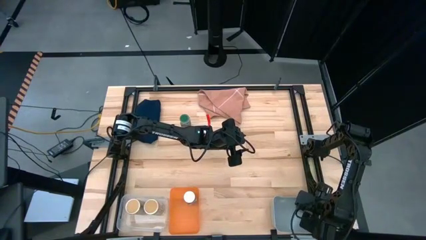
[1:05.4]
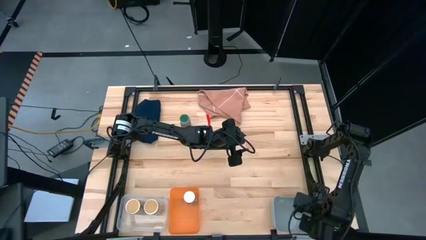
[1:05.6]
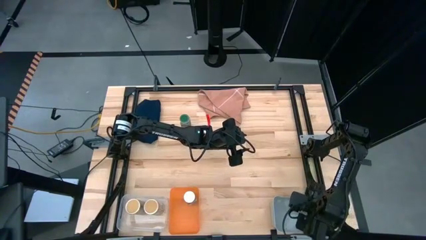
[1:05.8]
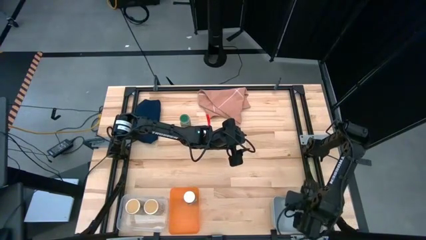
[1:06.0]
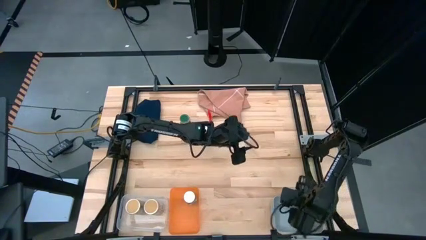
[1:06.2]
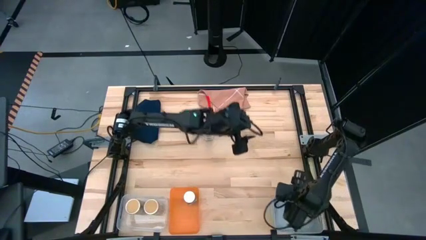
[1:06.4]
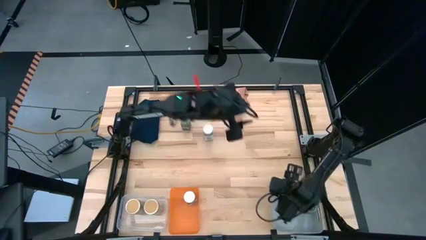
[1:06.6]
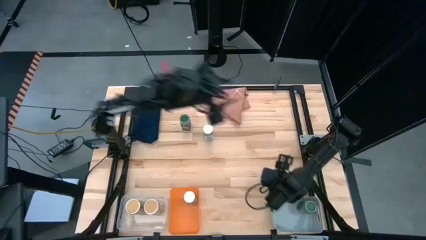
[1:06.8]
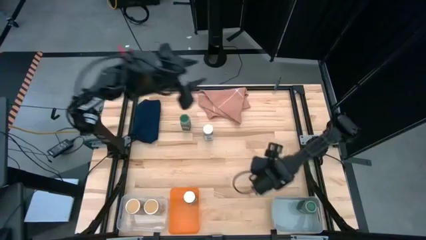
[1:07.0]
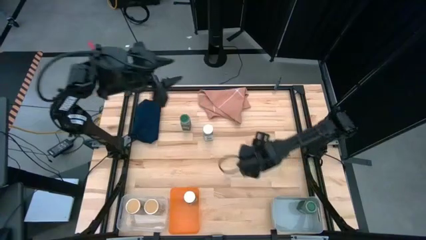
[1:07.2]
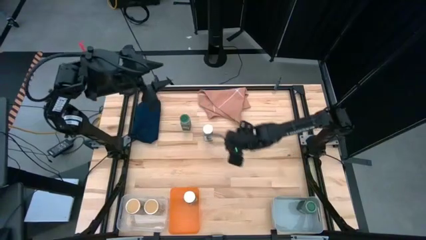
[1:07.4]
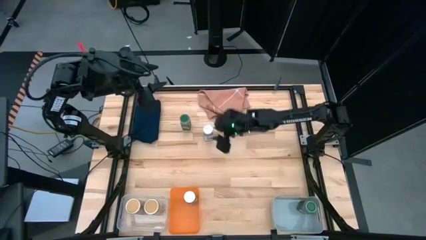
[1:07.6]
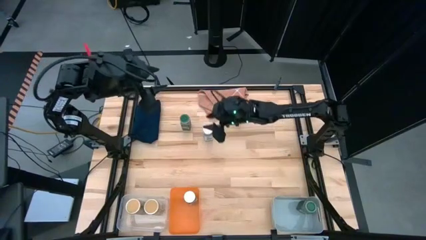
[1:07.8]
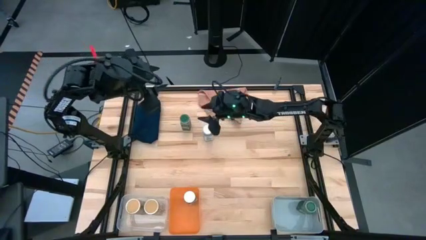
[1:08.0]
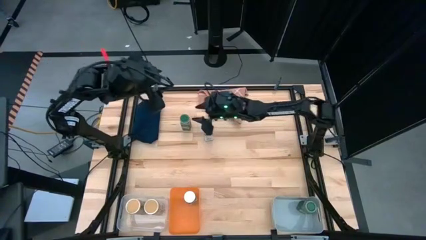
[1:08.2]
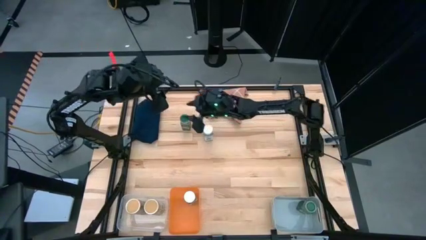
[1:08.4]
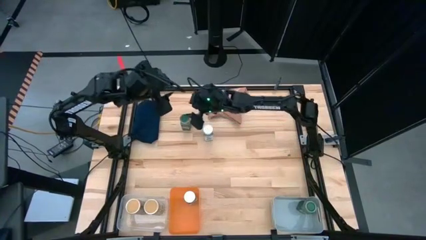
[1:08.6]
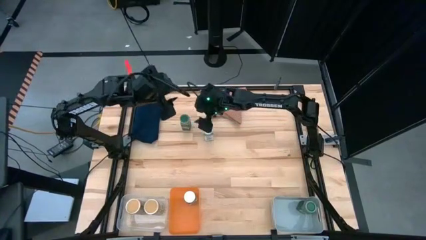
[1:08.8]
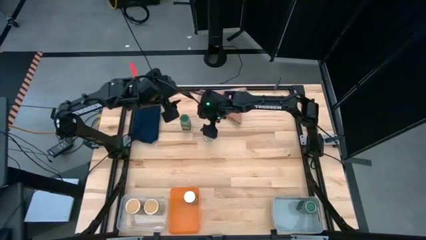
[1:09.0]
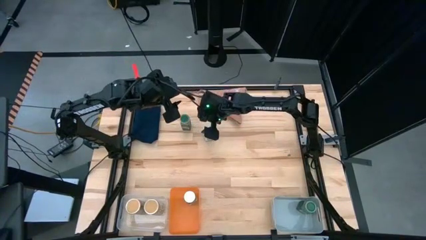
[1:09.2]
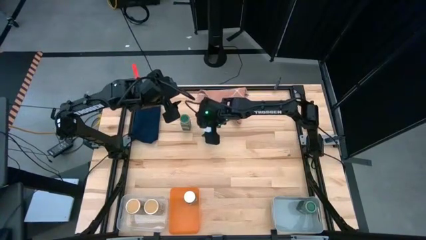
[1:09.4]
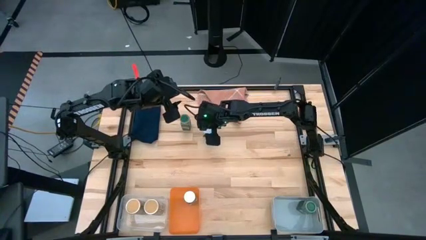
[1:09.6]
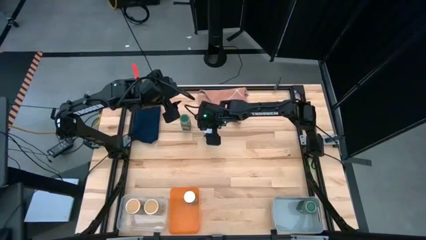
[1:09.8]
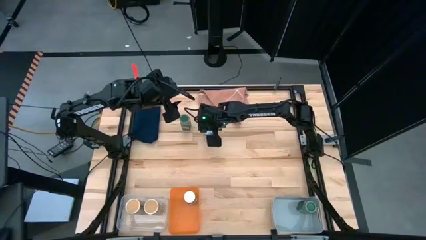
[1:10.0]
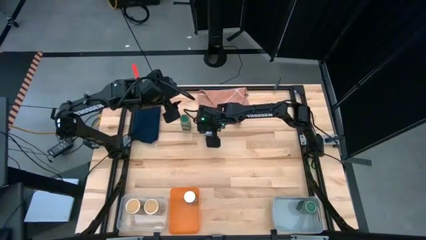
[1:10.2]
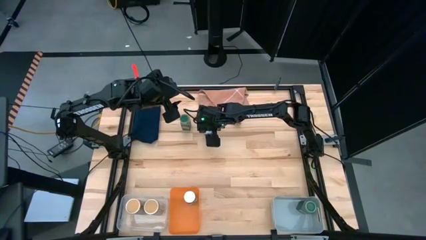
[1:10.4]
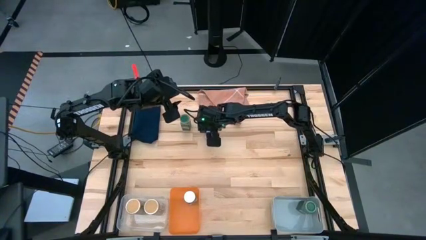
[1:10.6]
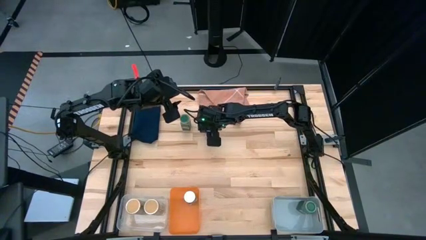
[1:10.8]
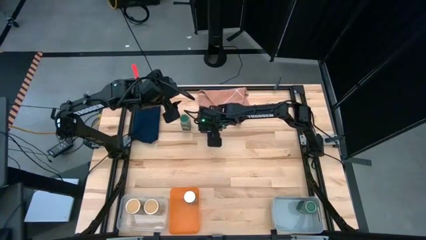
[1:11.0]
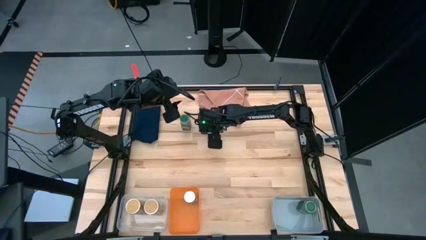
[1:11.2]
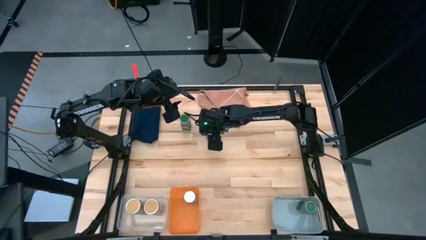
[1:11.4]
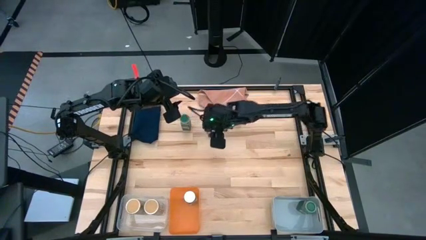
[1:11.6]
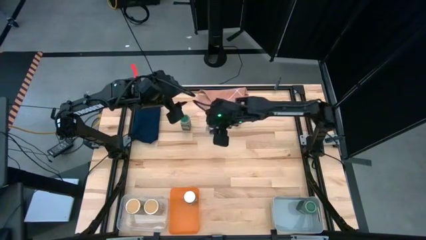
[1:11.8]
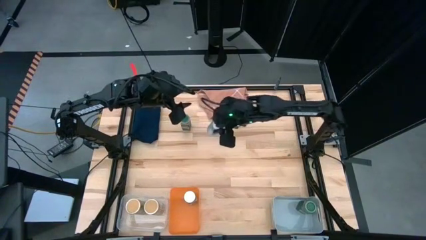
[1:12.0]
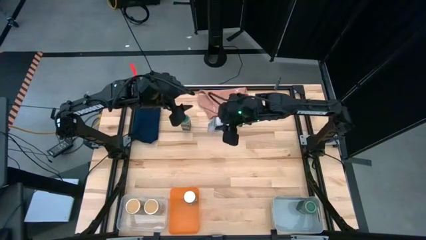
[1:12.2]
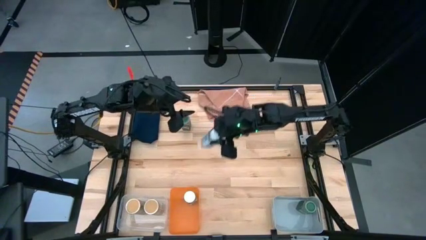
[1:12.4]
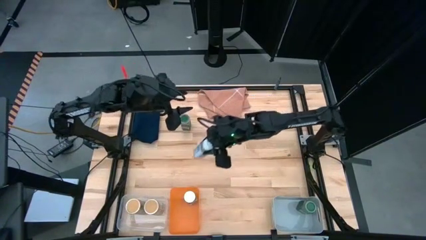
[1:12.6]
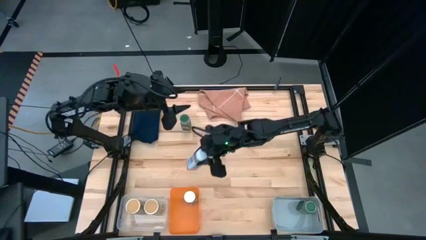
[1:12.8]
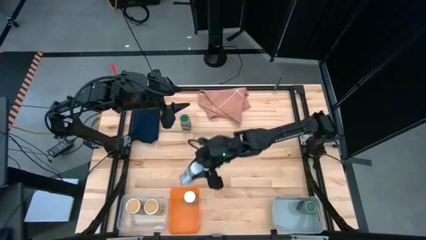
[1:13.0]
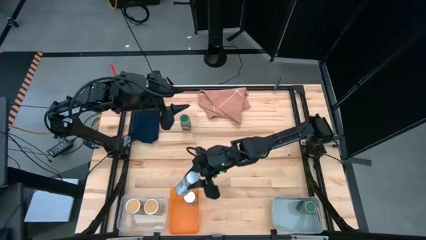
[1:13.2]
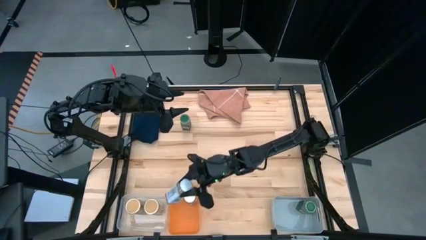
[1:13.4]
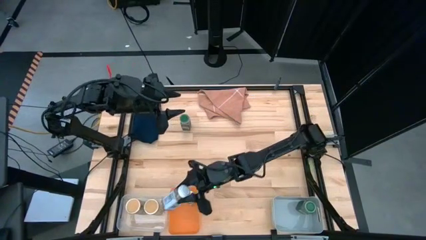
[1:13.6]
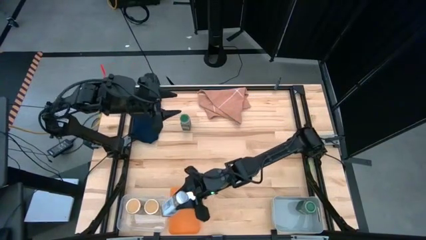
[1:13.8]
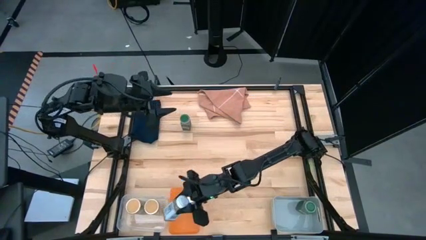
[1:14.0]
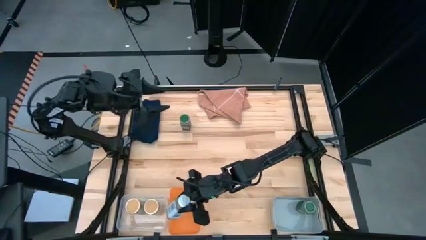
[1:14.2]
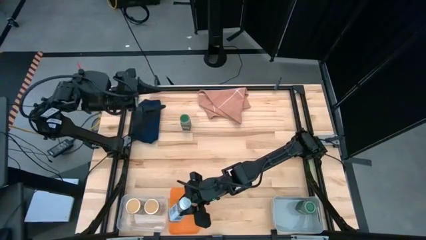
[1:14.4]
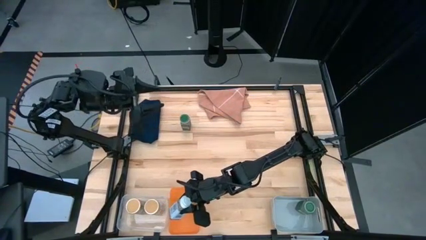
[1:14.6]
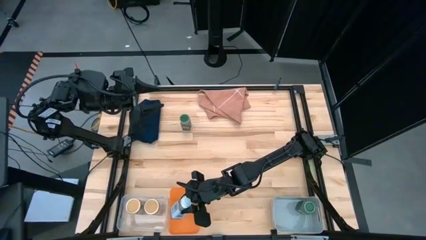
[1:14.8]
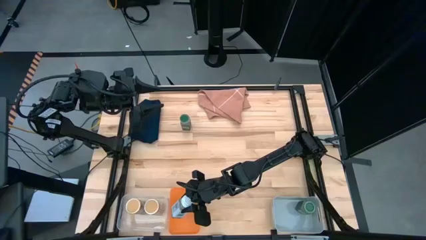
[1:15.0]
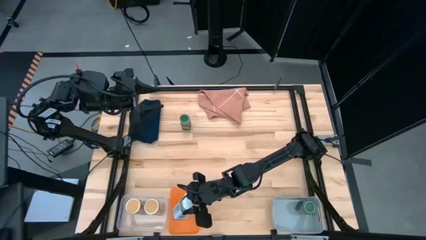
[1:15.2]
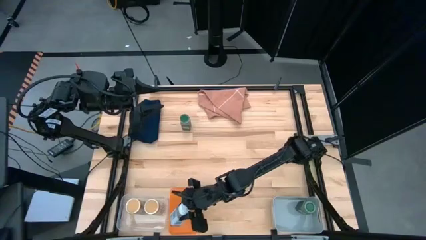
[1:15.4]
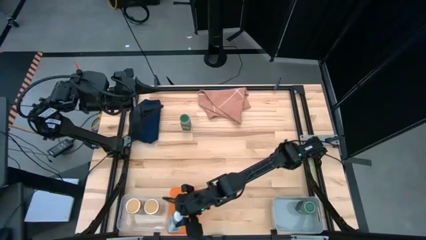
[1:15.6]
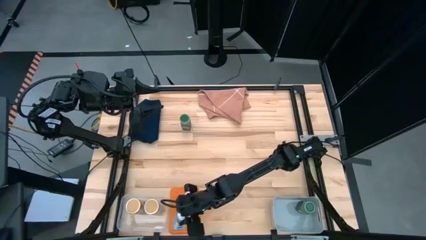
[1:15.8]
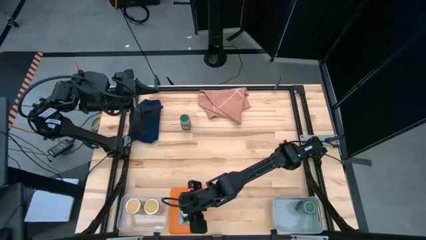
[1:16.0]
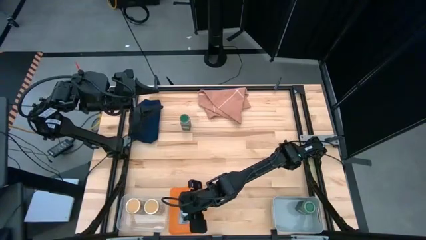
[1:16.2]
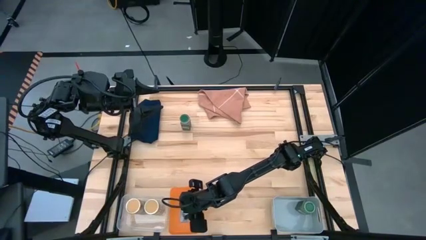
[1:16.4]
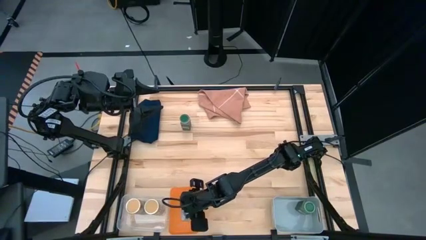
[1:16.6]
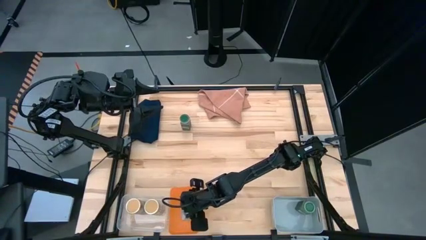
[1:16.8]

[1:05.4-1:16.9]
Task: Sort spices by type
Put the white seasoning bottle into the orange bin
